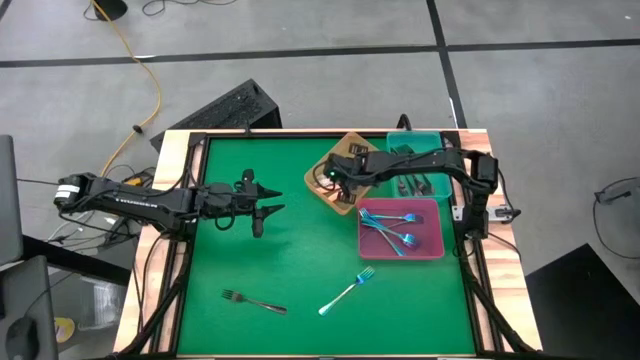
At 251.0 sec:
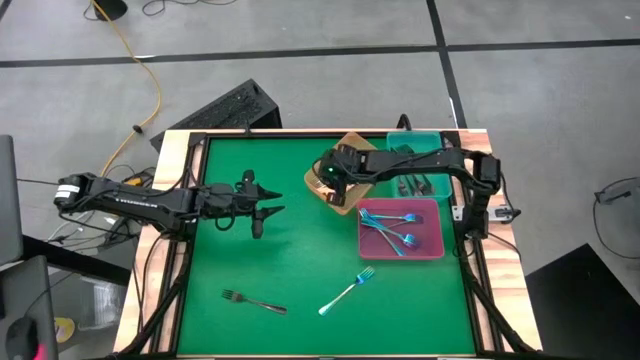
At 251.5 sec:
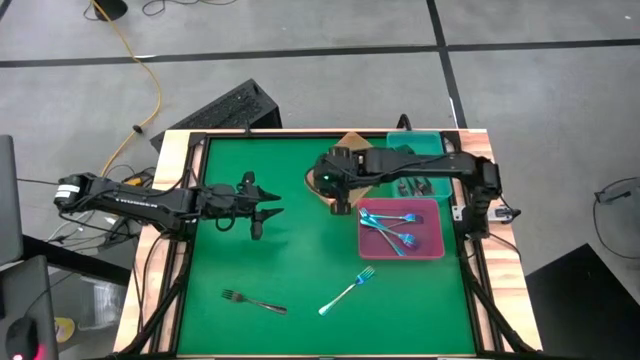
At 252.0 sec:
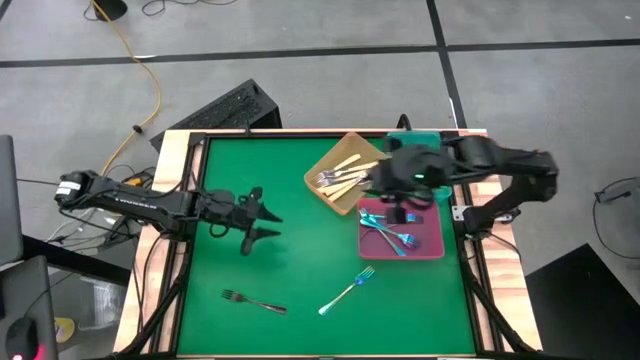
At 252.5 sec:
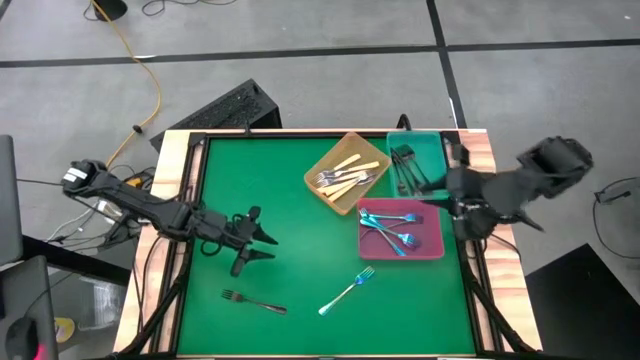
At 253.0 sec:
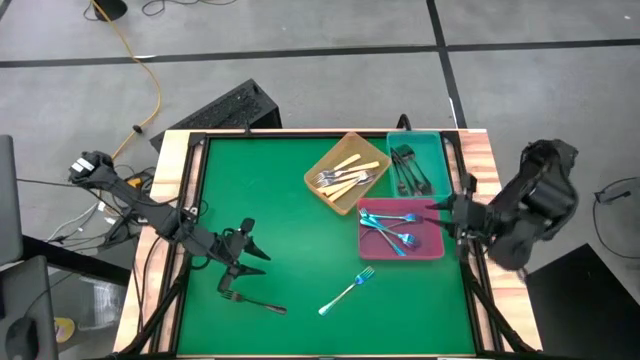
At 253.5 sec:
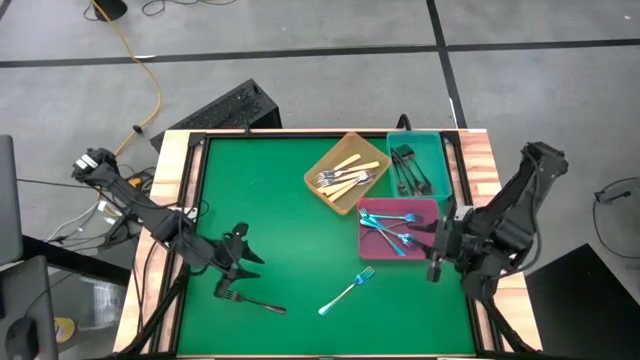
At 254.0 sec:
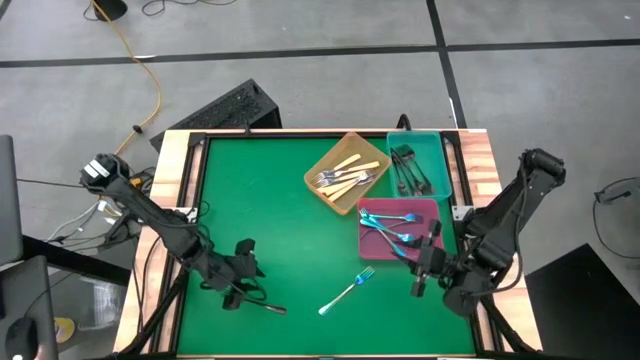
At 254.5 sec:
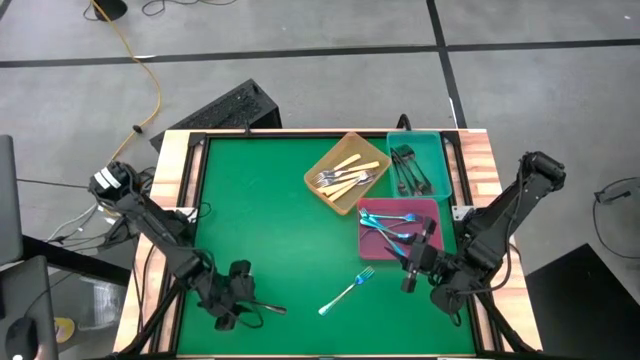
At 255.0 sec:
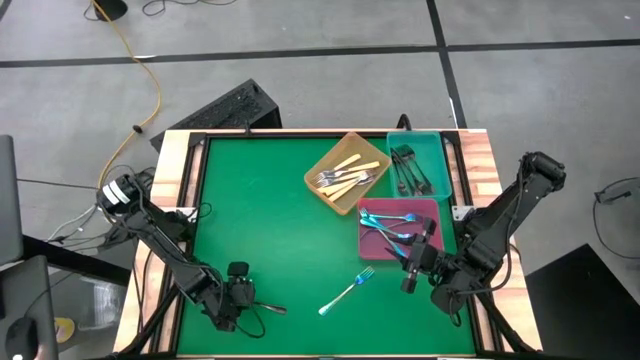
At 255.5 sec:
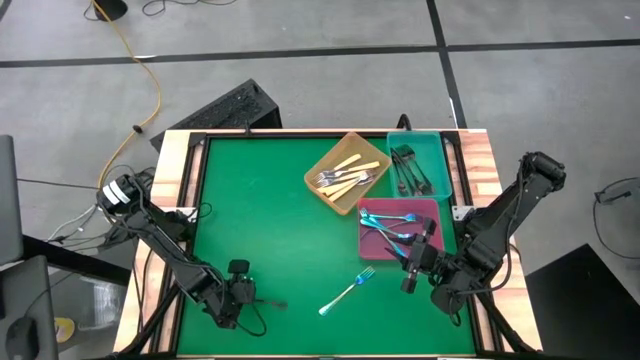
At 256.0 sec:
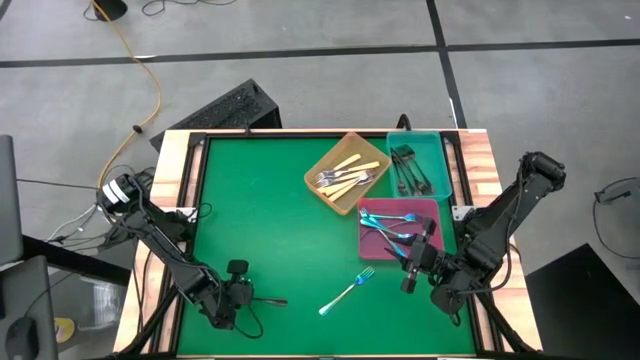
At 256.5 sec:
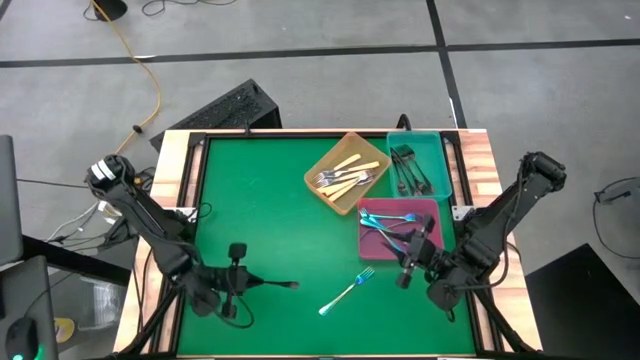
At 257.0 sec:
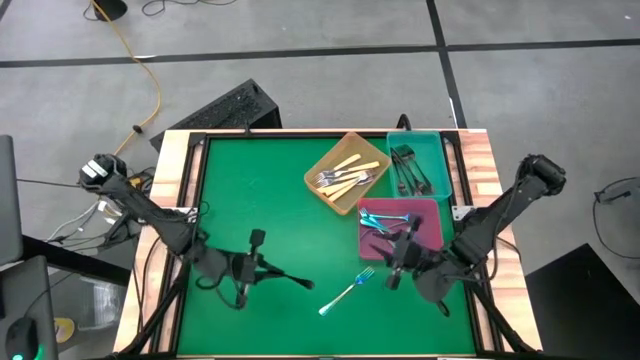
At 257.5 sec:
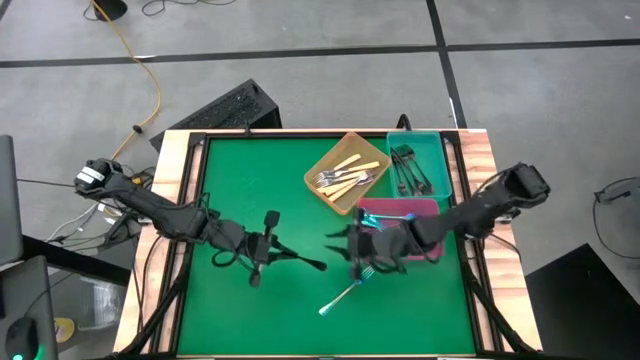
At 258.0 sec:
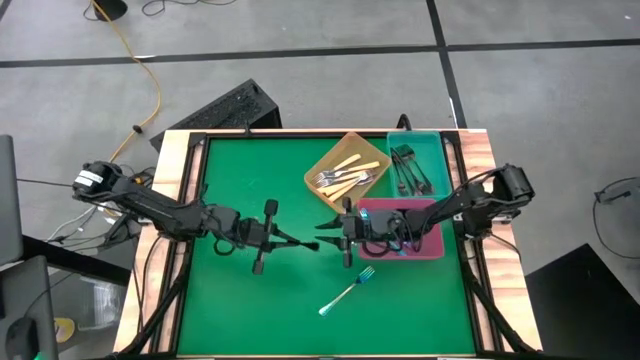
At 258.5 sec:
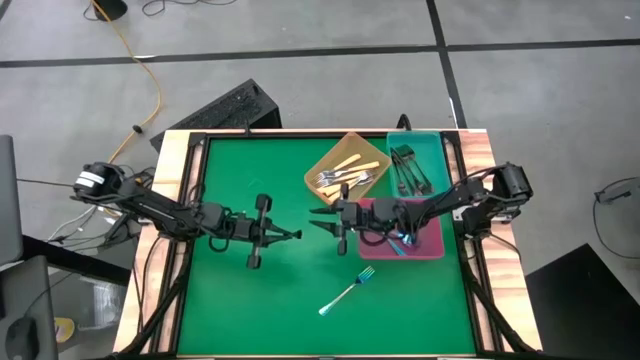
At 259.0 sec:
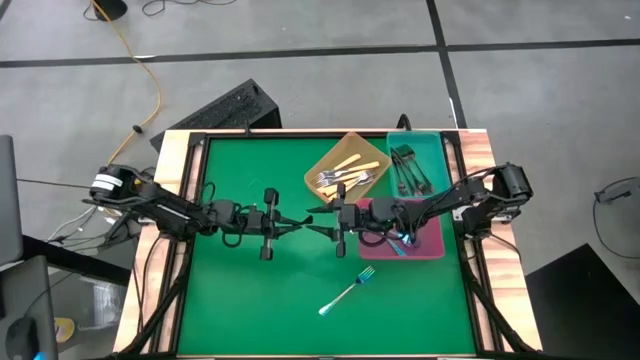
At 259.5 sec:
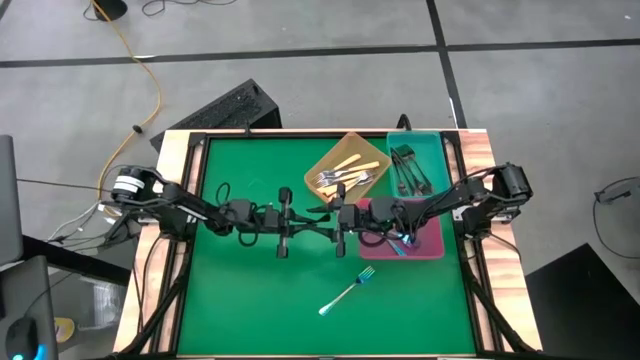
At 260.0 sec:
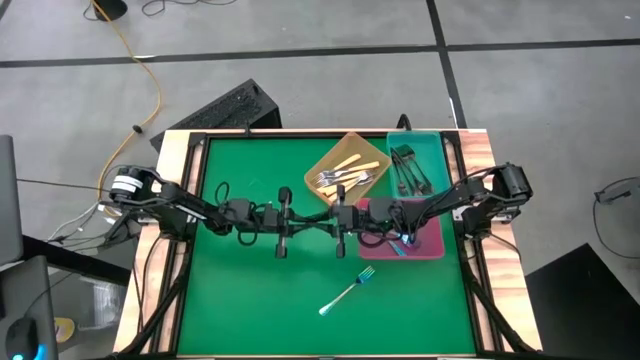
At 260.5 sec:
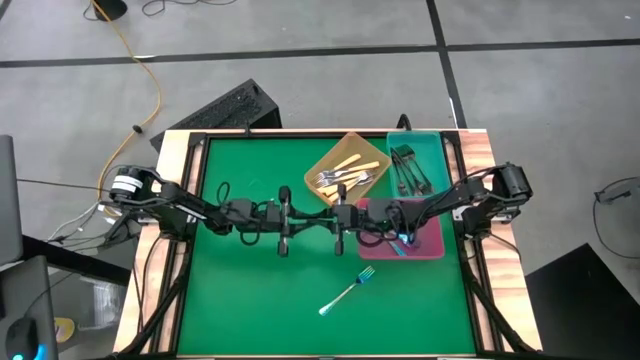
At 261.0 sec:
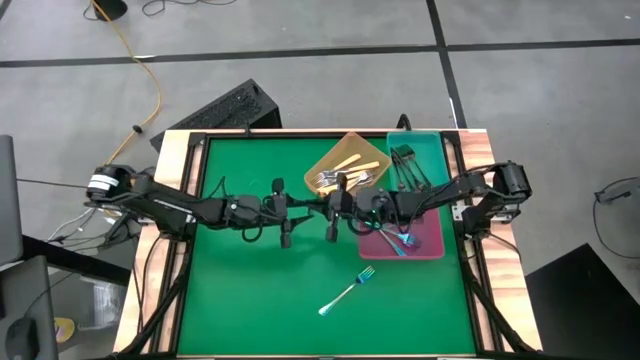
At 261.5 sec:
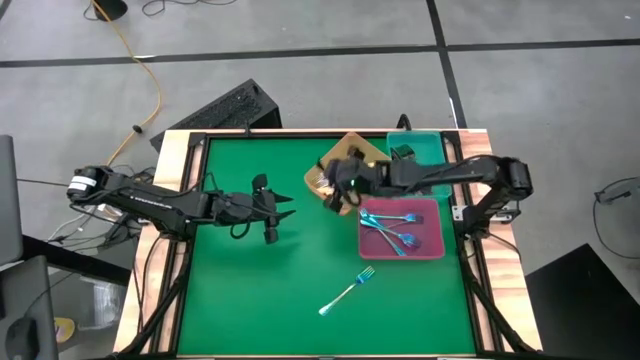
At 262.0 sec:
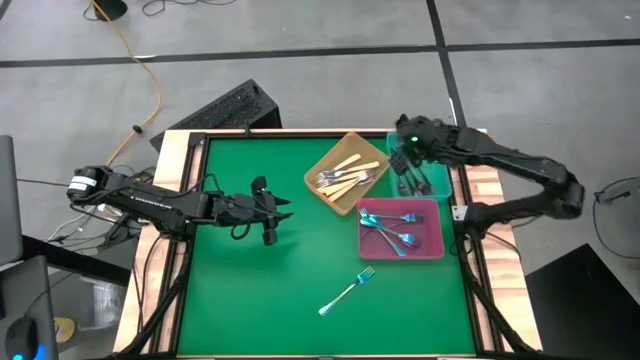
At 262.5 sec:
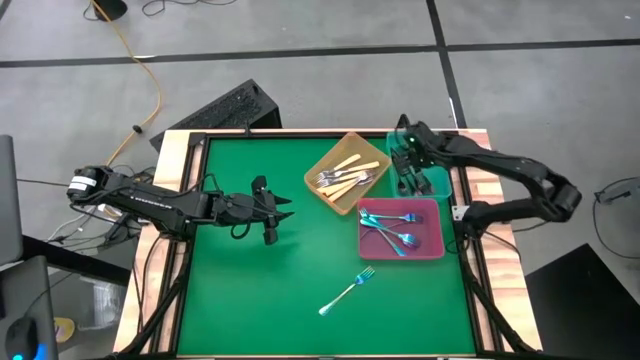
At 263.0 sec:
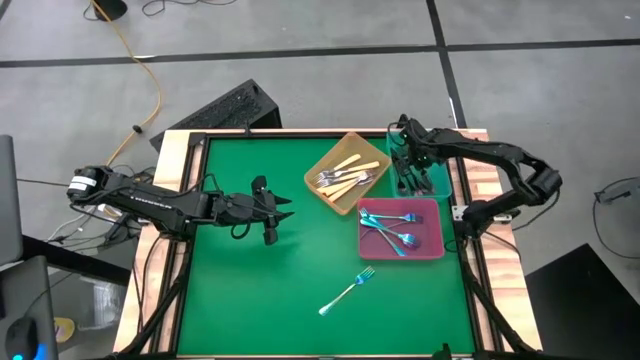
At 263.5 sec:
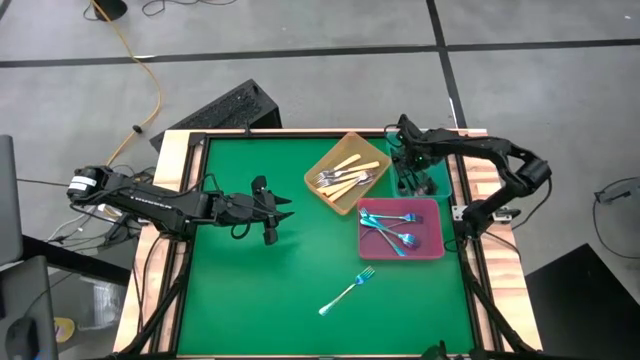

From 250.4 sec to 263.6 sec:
Task: Sort silverware by color (type)
Put the black fork into the blue bin

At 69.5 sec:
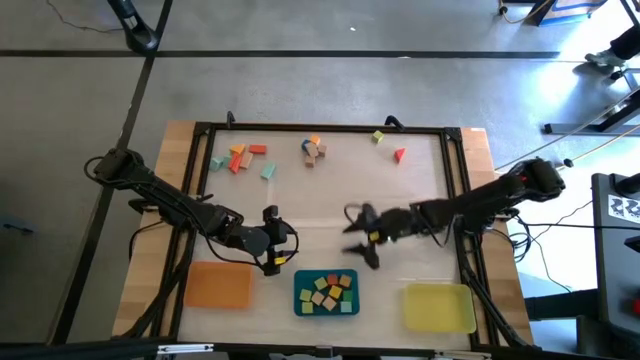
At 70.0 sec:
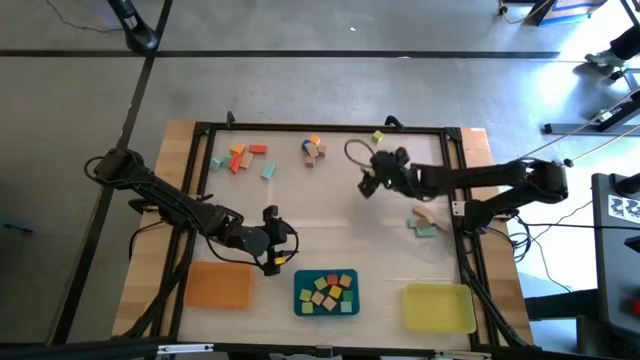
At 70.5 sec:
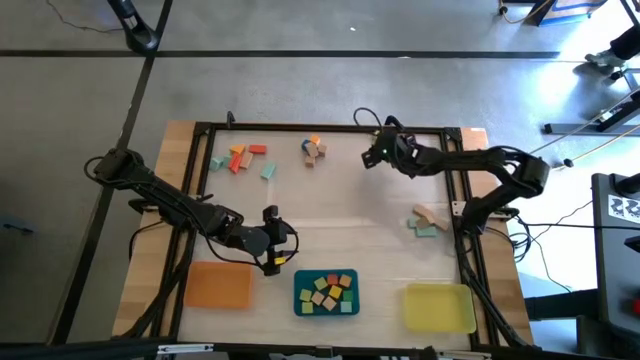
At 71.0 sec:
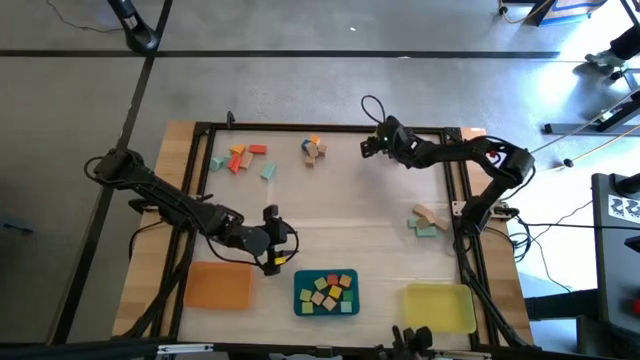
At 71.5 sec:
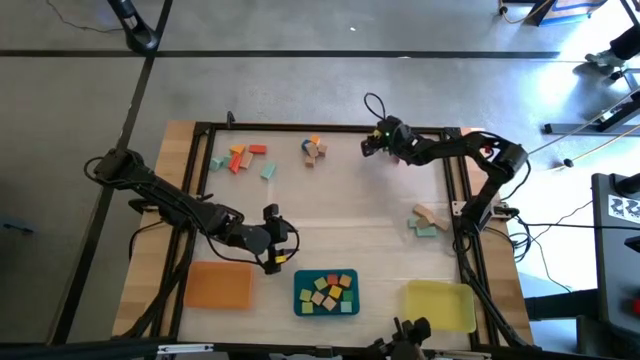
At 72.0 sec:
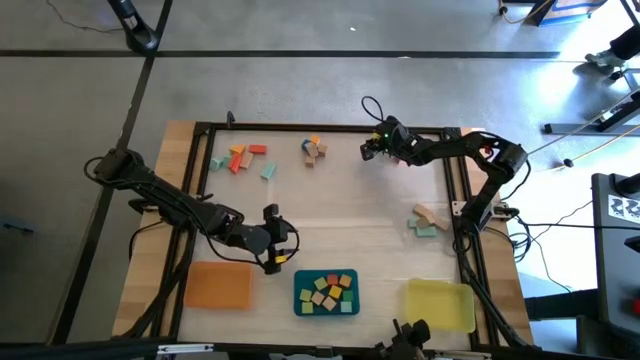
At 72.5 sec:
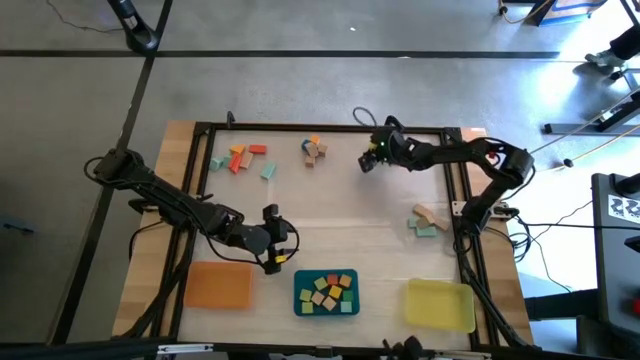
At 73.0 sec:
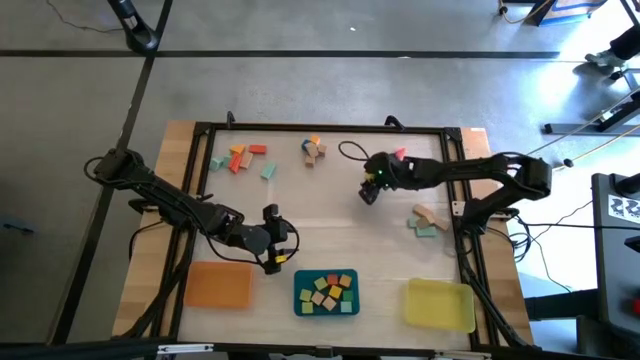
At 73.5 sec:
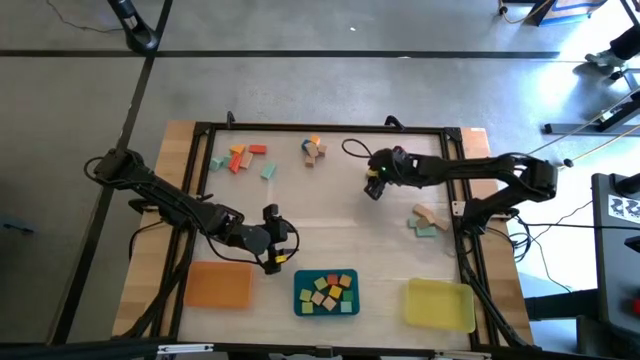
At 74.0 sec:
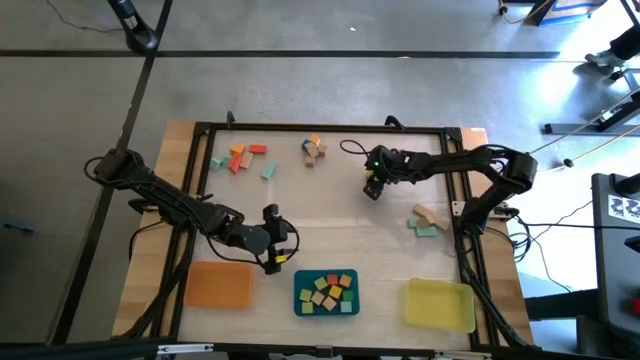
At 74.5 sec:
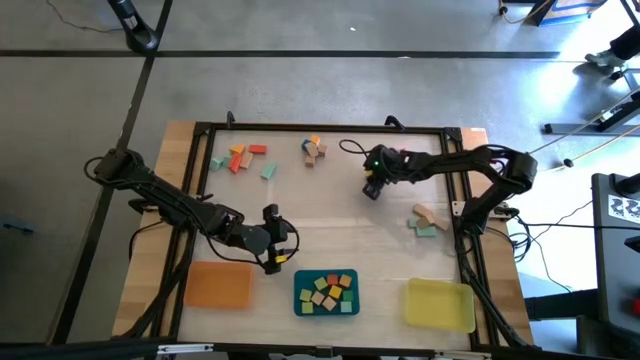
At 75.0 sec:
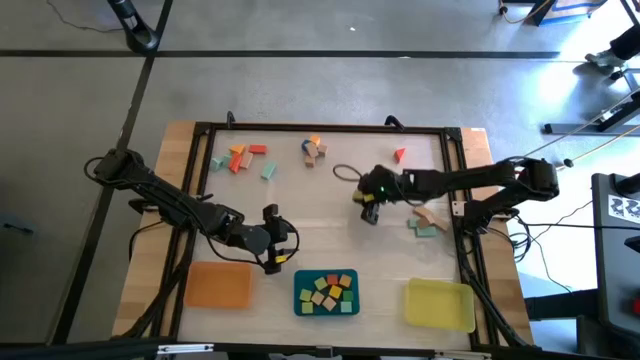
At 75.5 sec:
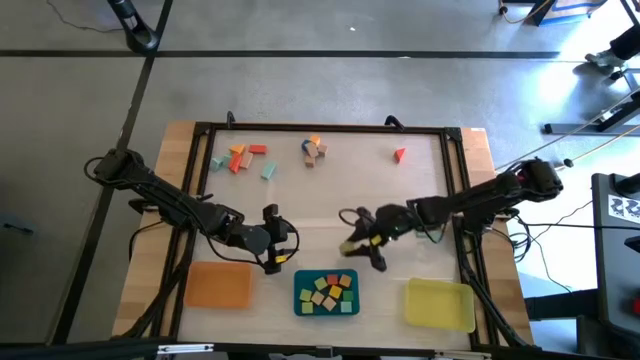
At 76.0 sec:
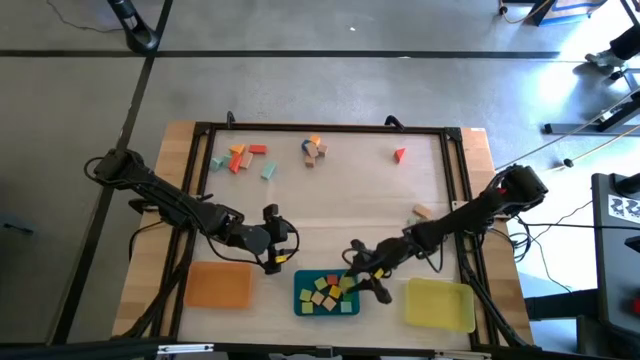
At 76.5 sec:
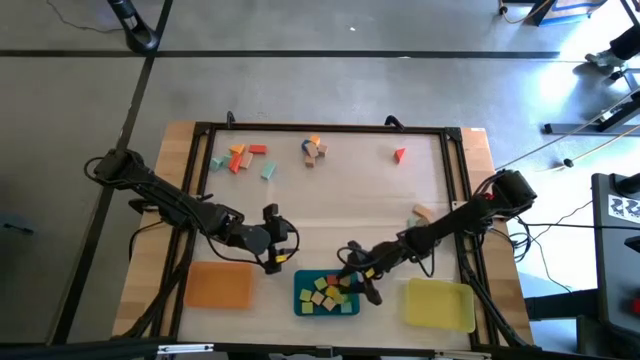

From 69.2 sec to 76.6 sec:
Task: Sort blocks by size
Put the light green cube block into the blue bin
